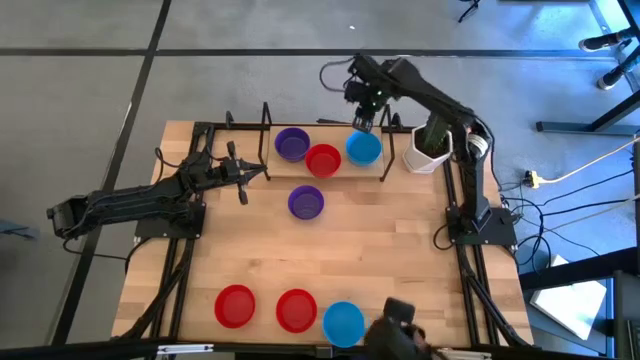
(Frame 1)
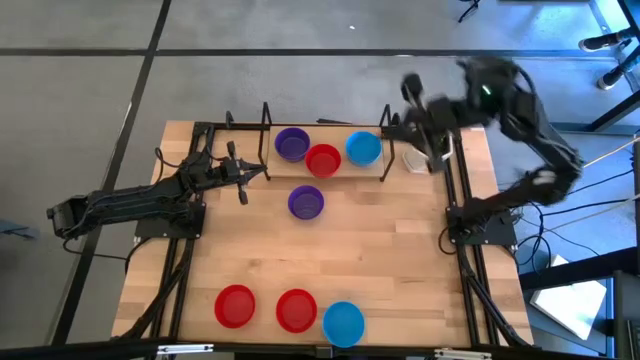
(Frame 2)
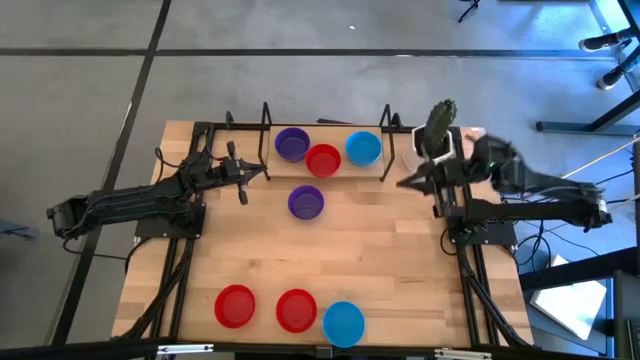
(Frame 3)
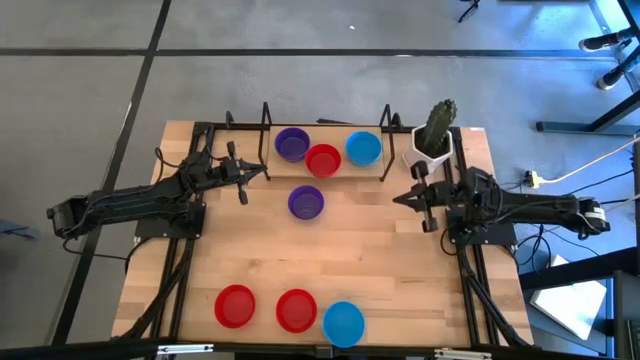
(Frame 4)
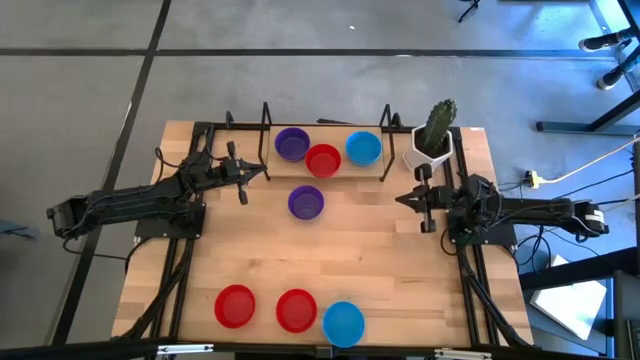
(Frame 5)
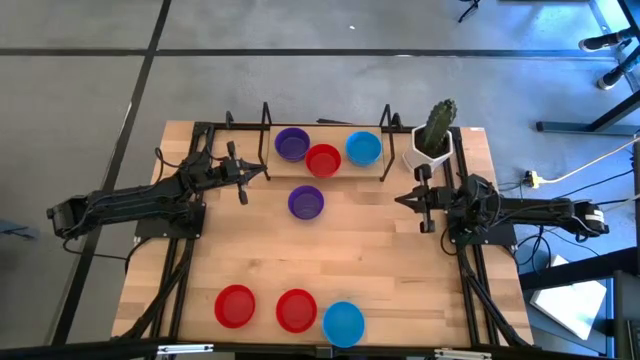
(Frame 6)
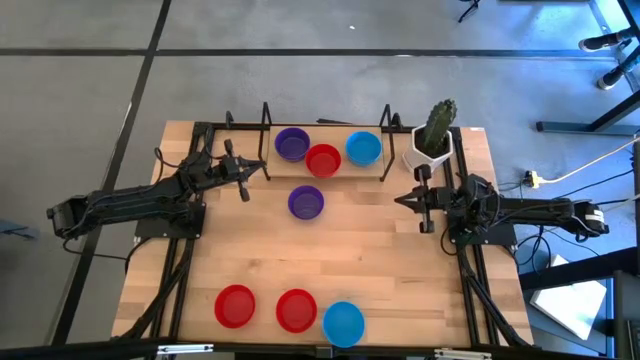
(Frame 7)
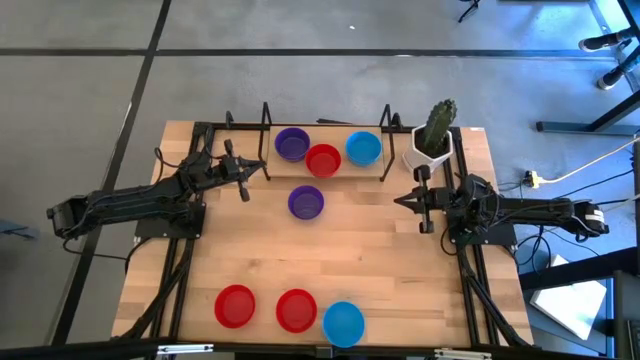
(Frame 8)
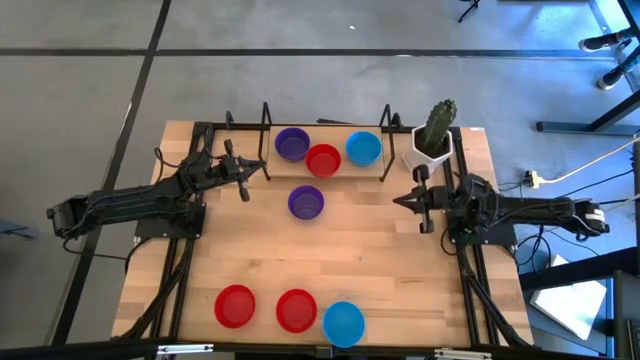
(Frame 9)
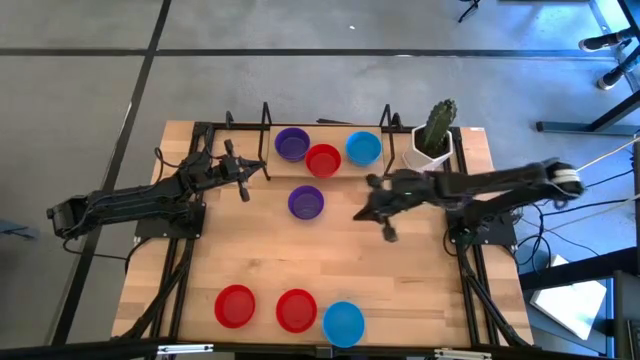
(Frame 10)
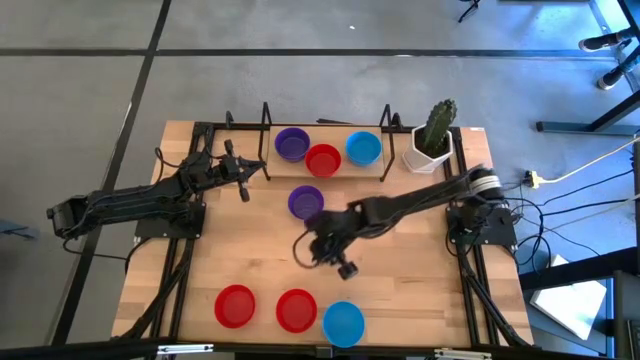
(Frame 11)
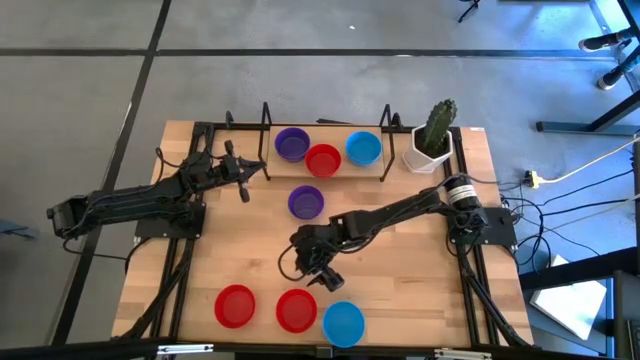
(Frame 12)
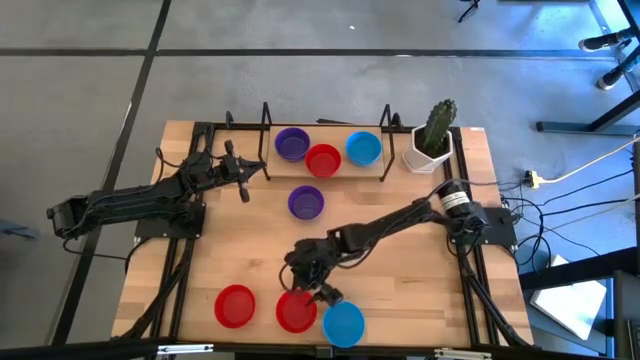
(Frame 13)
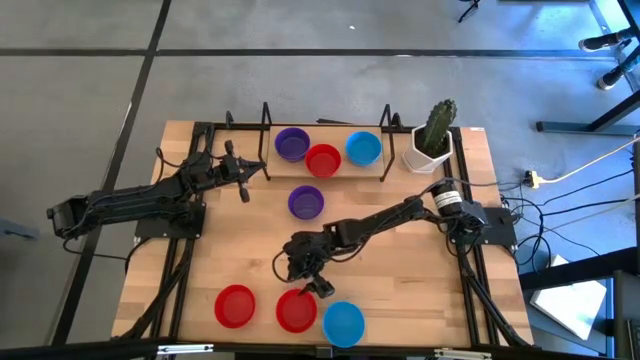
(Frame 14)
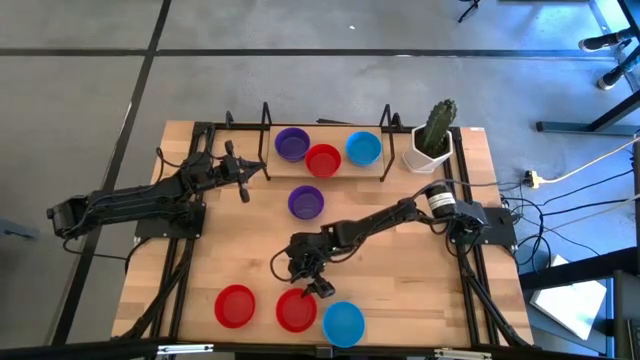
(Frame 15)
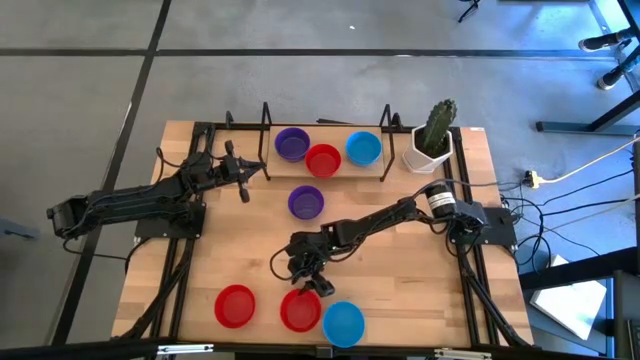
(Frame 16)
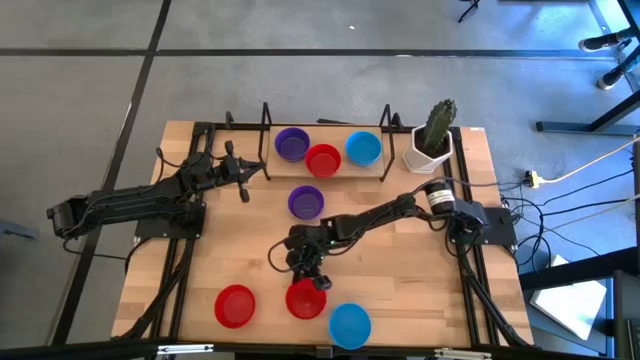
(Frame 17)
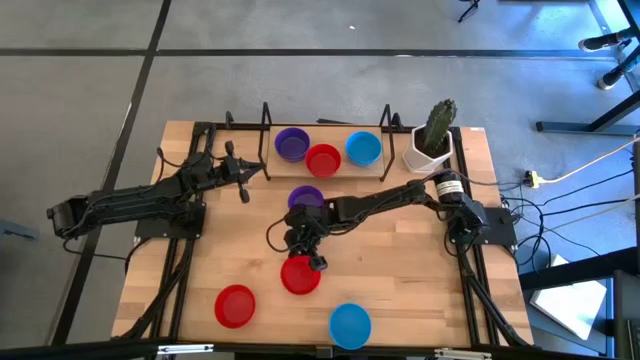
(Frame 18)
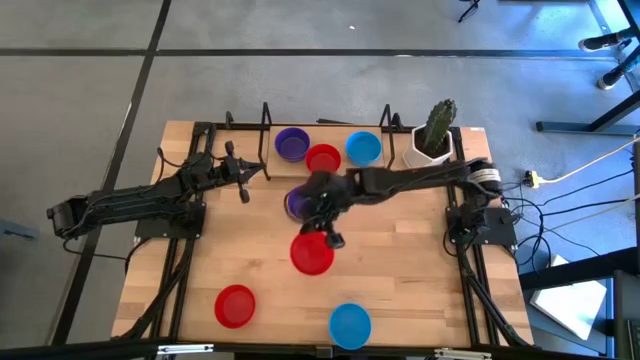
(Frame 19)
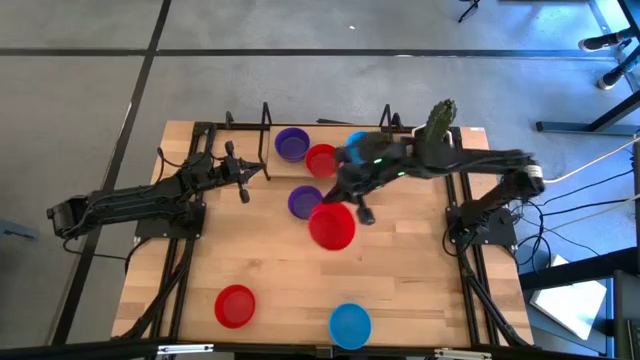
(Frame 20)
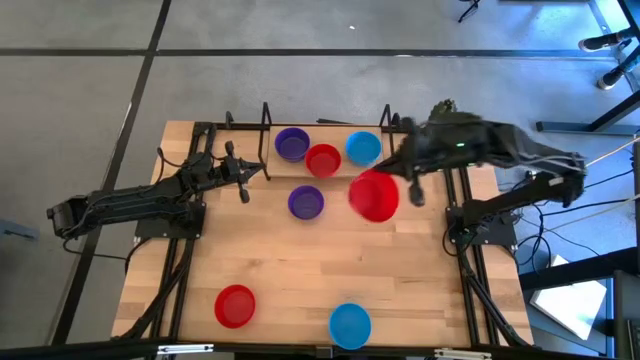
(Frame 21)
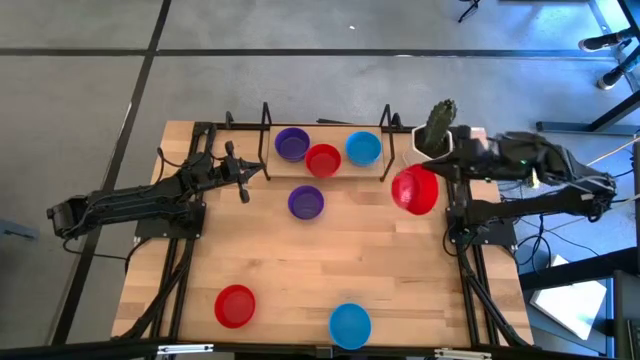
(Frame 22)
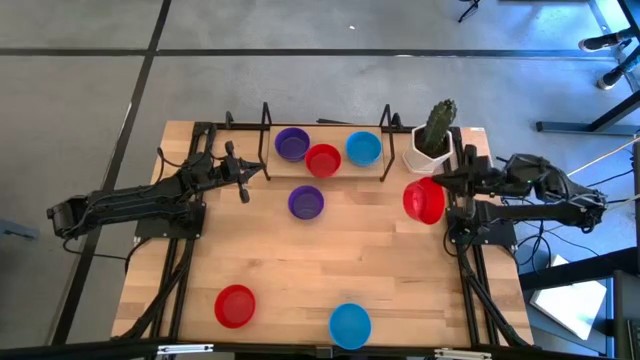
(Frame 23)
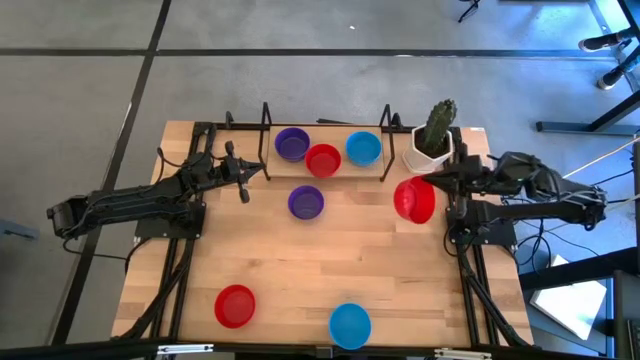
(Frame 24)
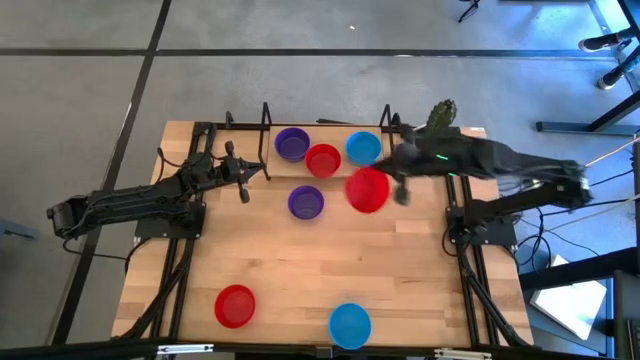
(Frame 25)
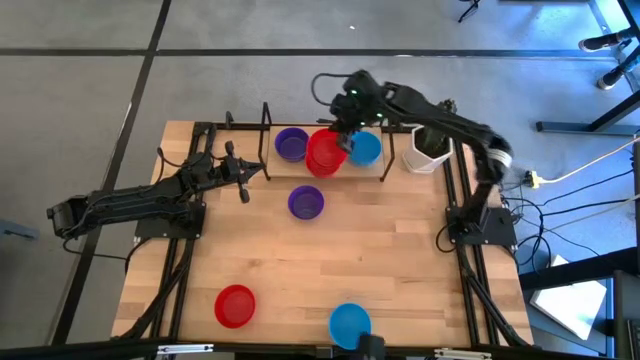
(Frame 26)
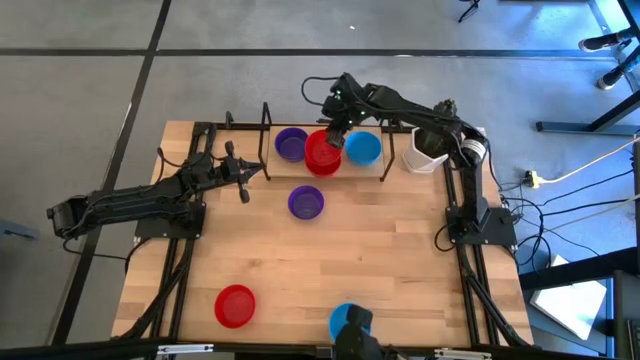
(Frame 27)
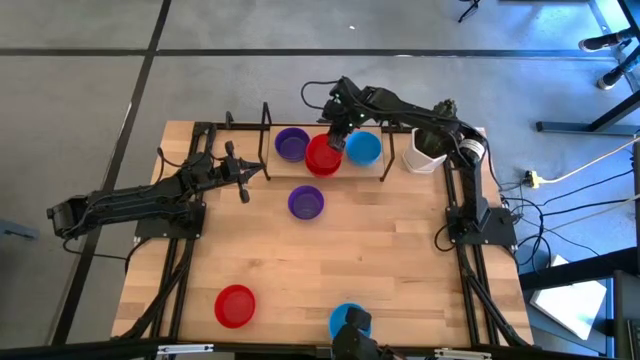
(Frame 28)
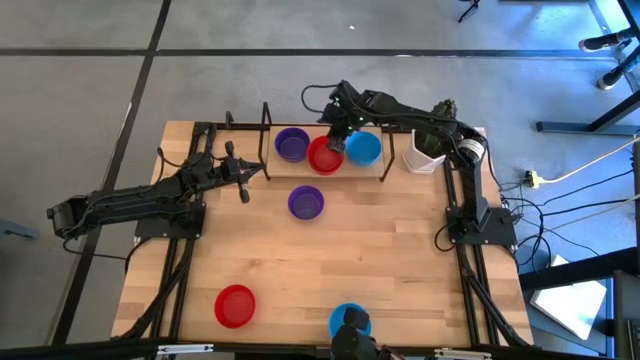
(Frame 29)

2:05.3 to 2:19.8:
Task: Pick & Place Mini bowls
Stack the red bowl on top of the red bowl on the shelf

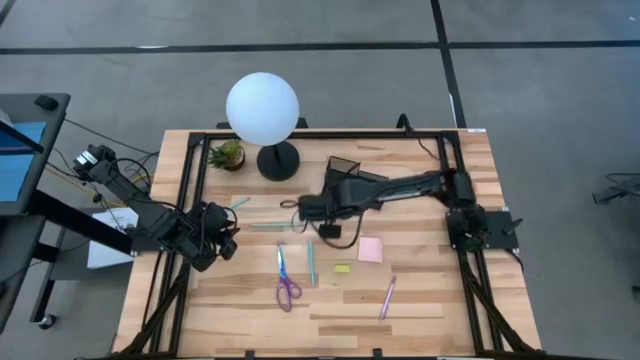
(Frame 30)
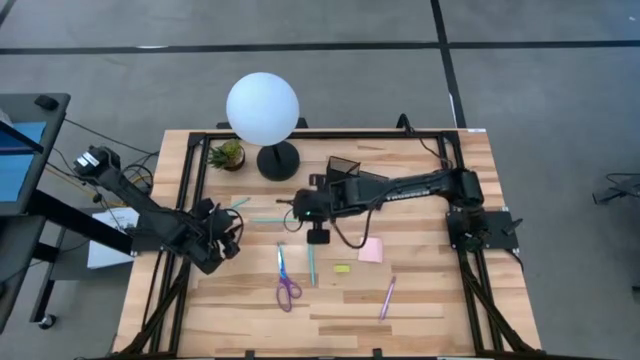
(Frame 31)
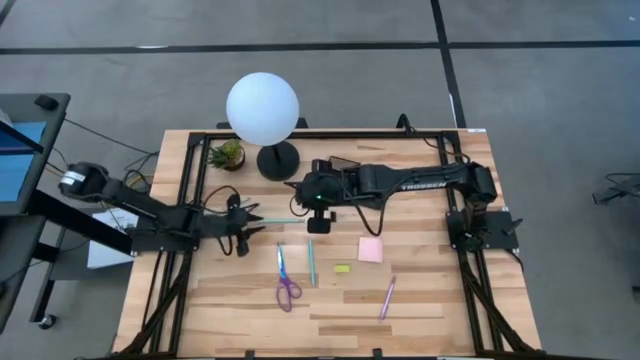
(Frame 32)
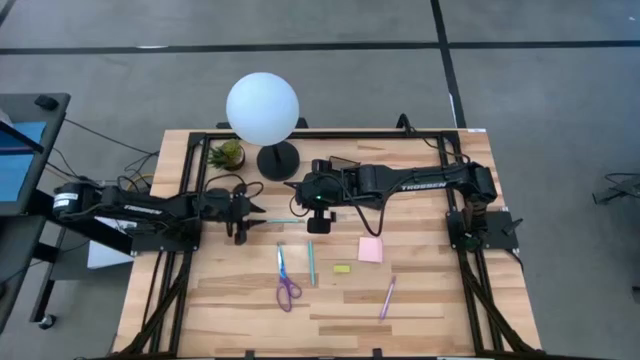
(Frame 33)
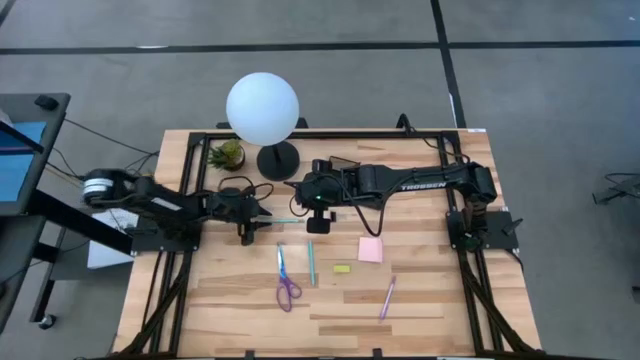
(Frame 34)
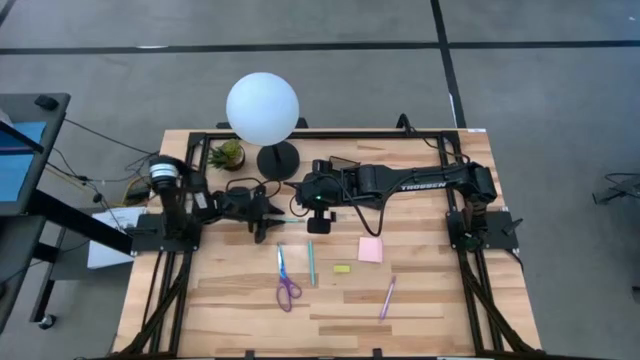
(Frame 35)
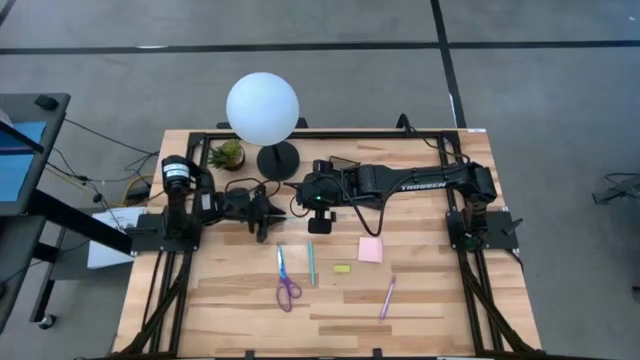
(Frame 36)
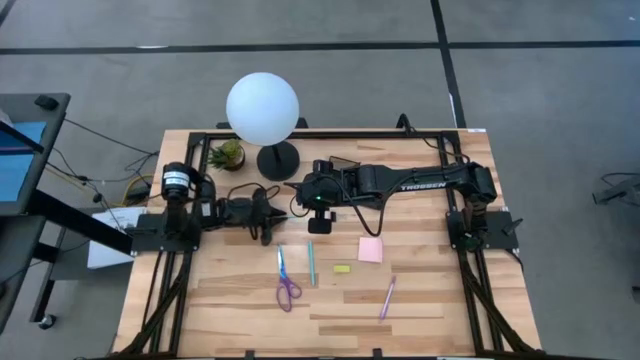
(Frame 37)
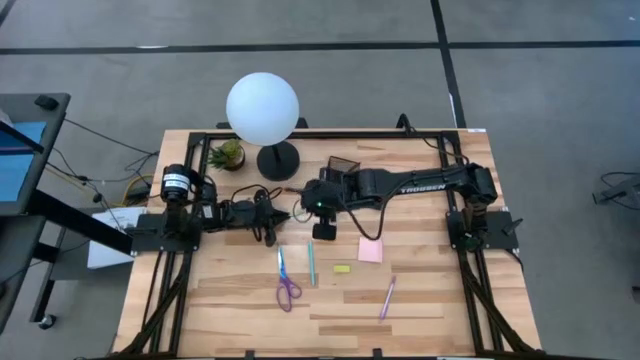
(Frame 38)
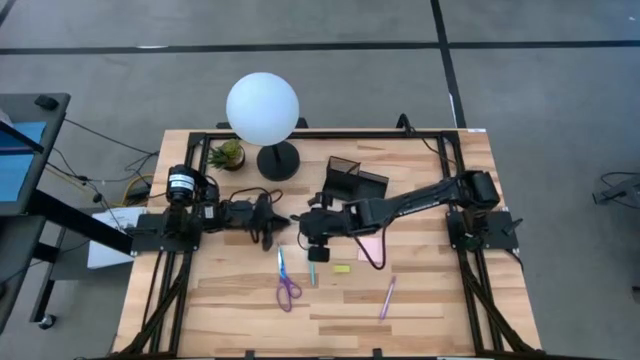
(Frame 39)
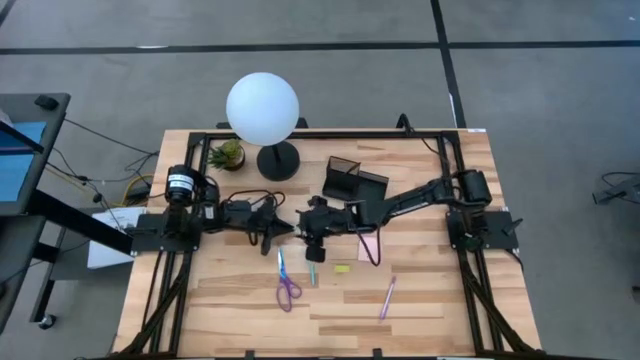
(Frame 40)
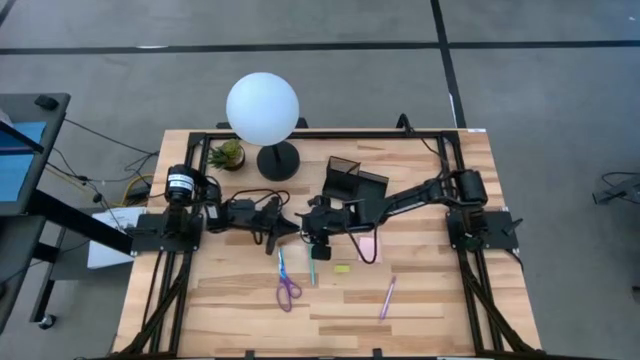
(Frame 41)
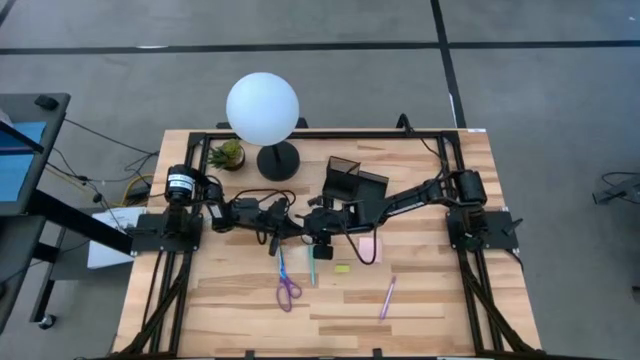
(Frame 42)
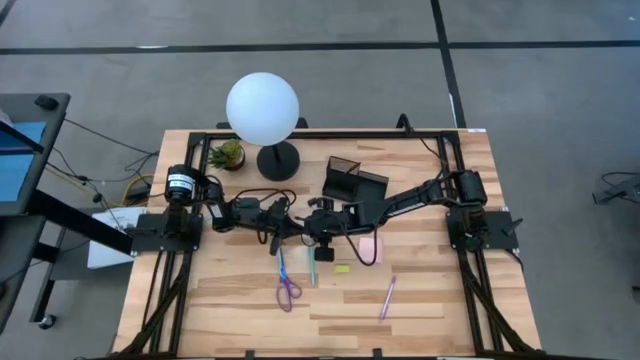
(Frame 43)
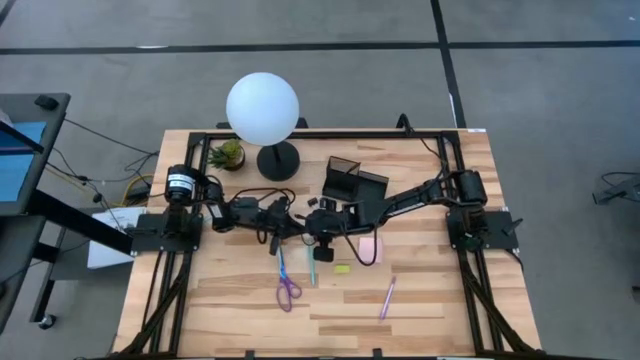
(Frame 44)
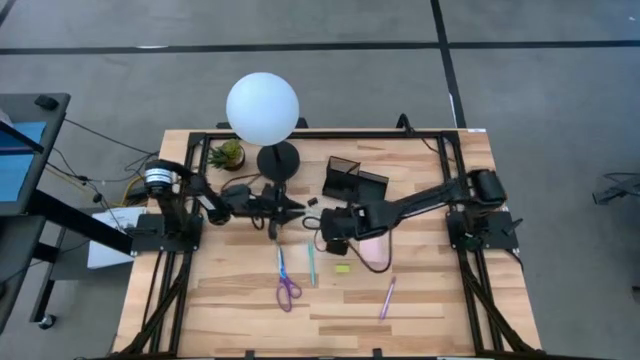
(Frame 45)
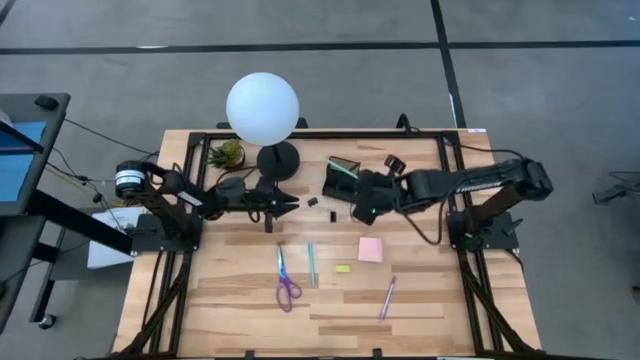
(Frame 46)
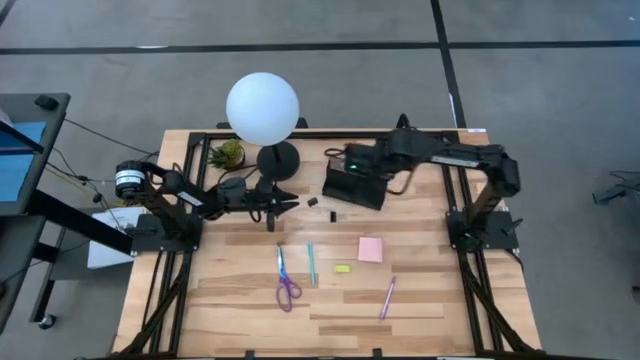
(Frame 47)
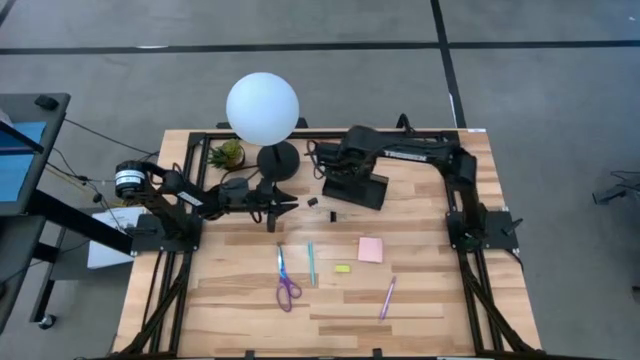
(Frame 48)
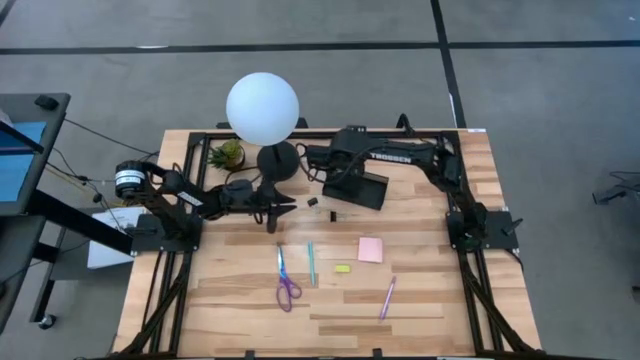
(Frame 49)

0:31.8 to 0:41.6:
Task: Pick and place office supplies into organizer
Put the blue pencil into the black desk organizer
